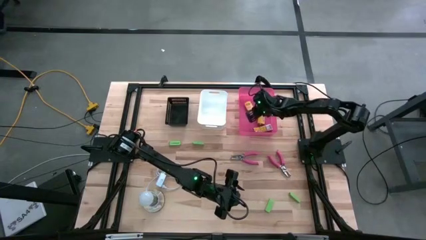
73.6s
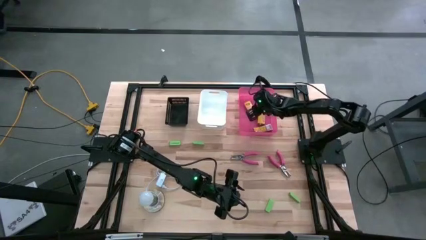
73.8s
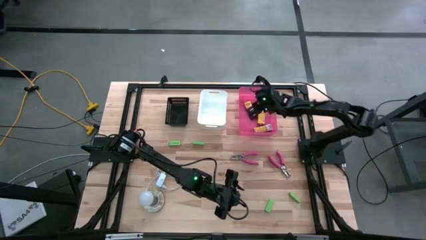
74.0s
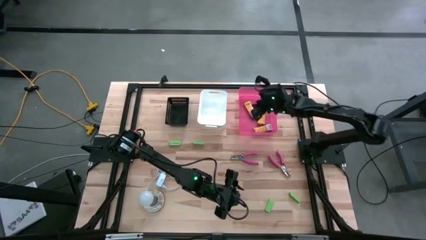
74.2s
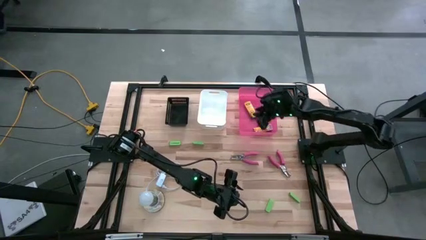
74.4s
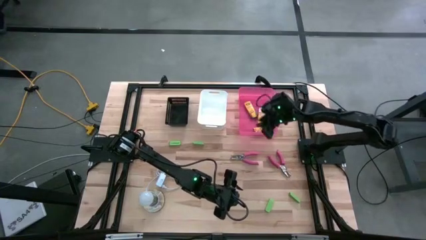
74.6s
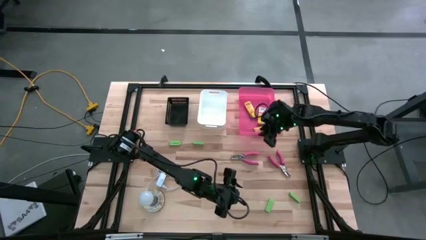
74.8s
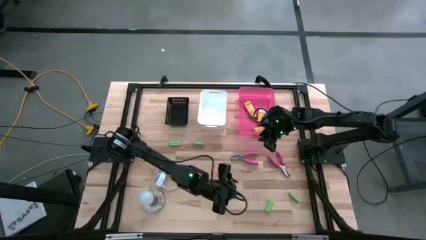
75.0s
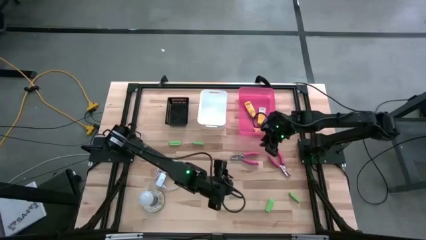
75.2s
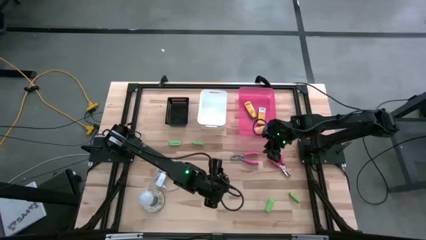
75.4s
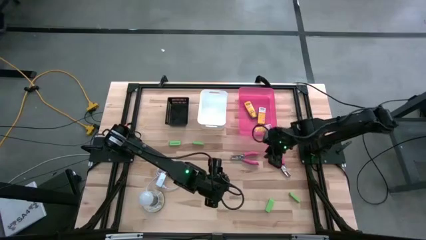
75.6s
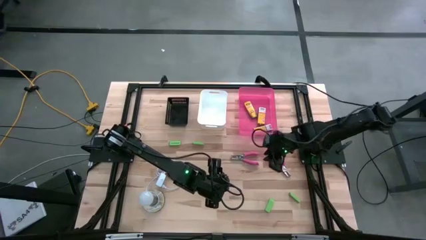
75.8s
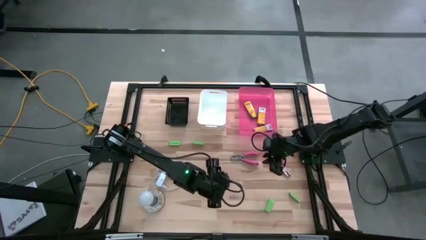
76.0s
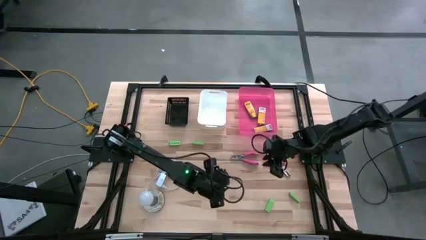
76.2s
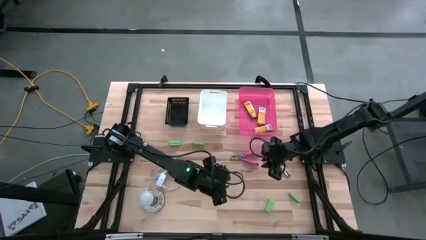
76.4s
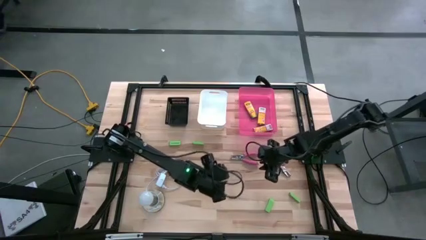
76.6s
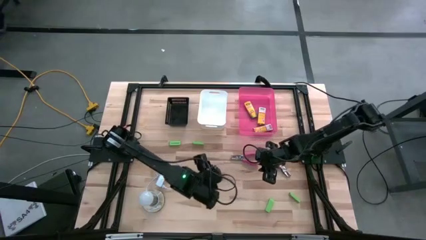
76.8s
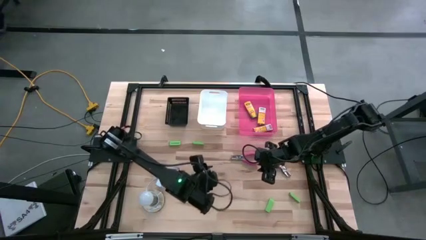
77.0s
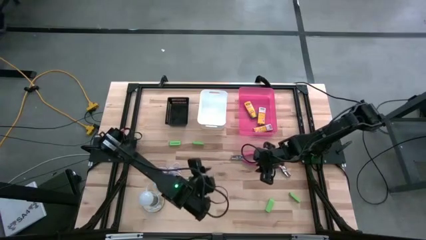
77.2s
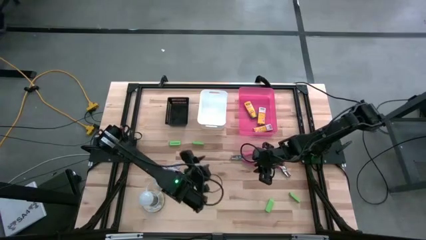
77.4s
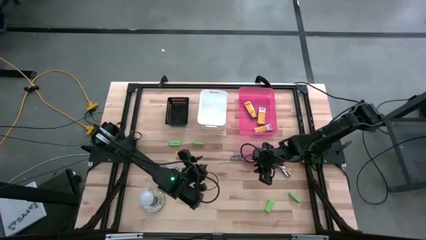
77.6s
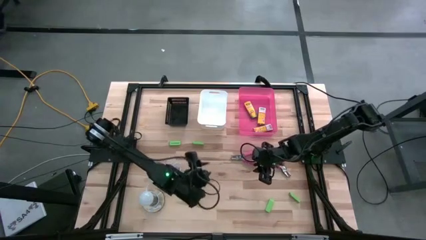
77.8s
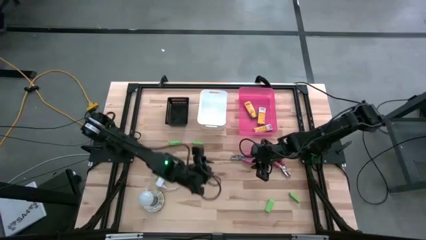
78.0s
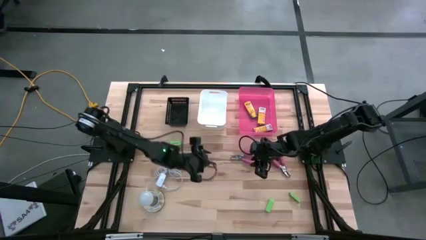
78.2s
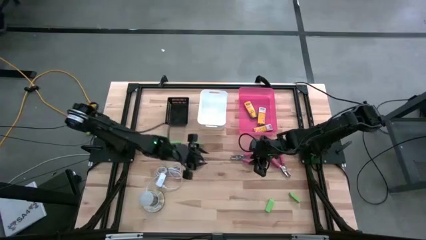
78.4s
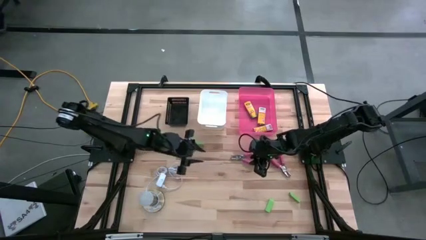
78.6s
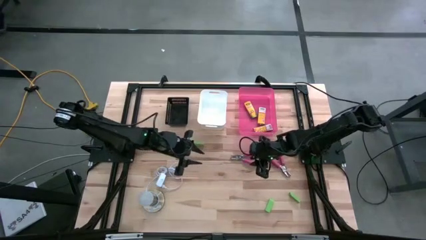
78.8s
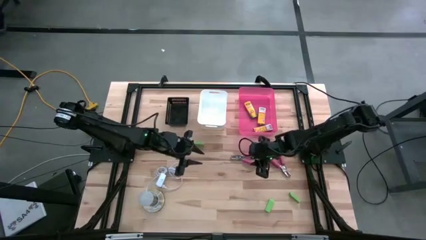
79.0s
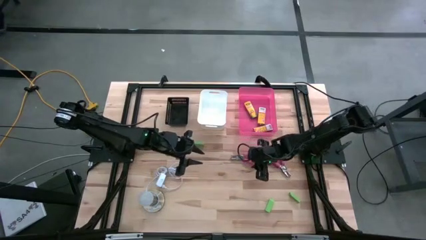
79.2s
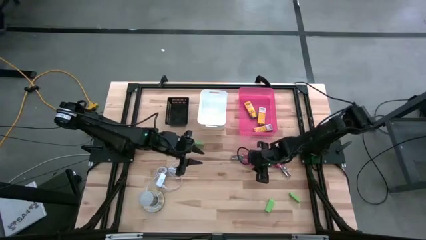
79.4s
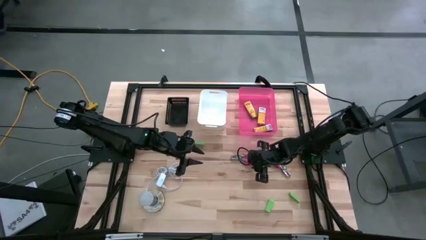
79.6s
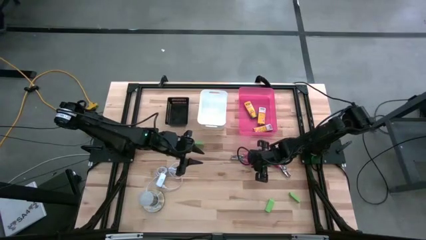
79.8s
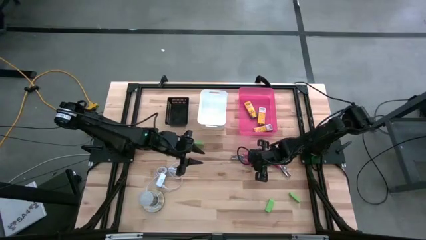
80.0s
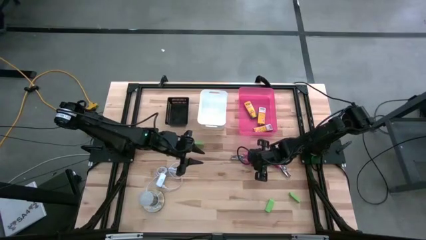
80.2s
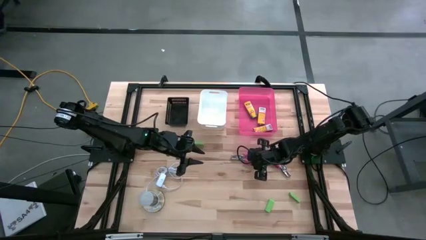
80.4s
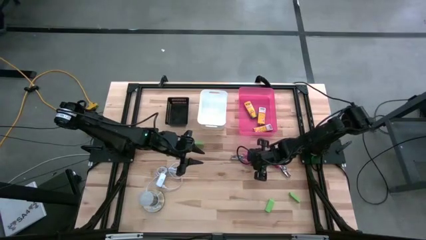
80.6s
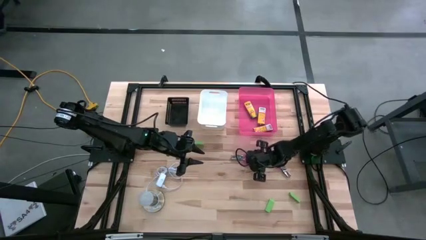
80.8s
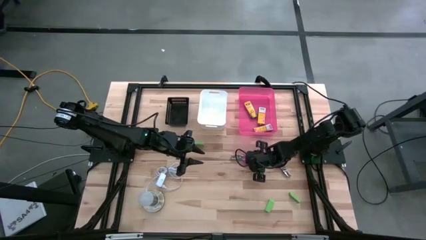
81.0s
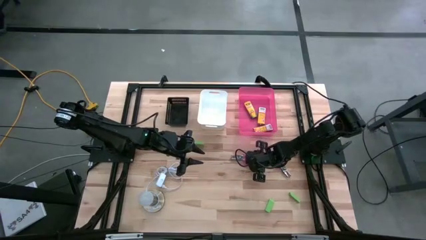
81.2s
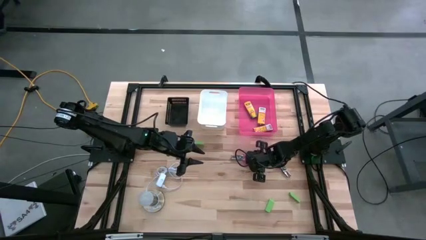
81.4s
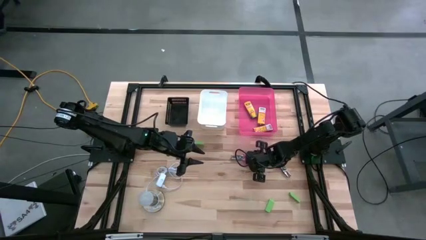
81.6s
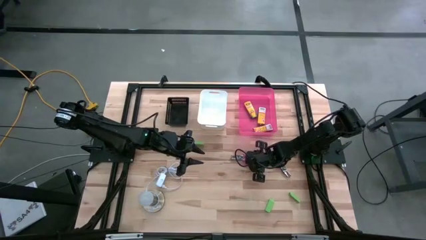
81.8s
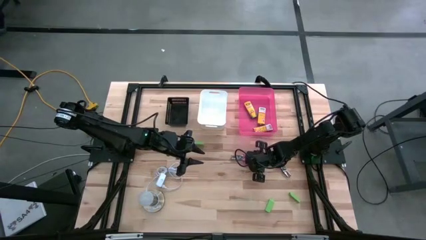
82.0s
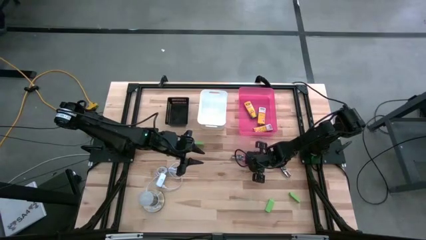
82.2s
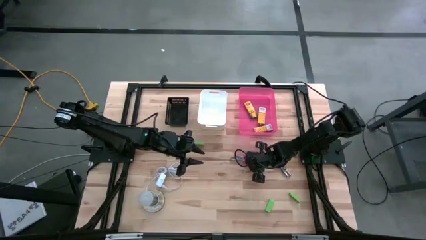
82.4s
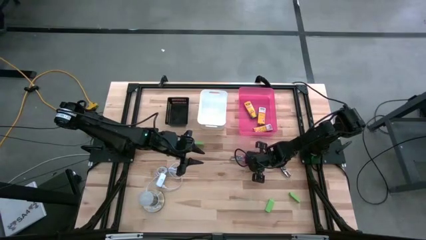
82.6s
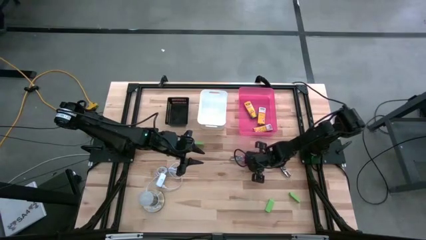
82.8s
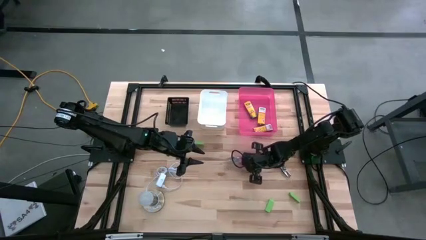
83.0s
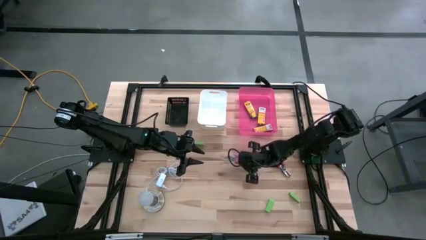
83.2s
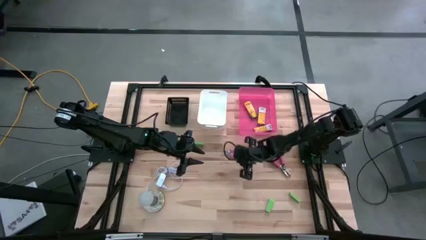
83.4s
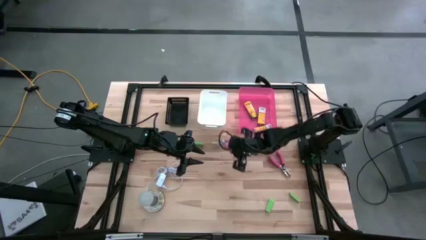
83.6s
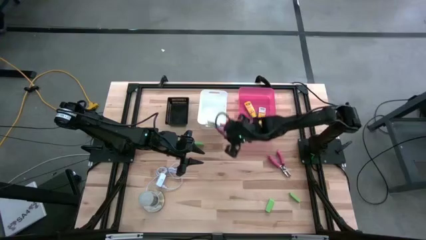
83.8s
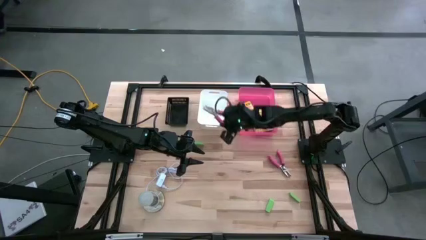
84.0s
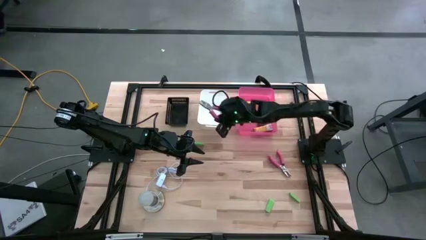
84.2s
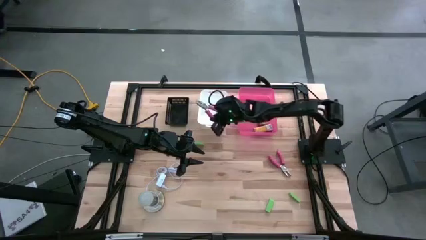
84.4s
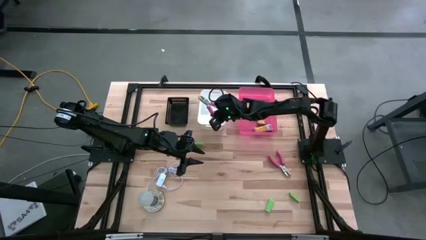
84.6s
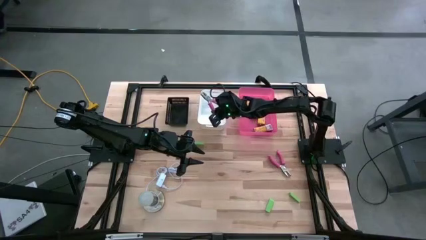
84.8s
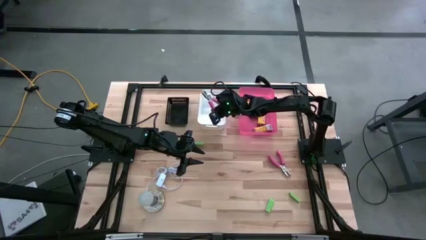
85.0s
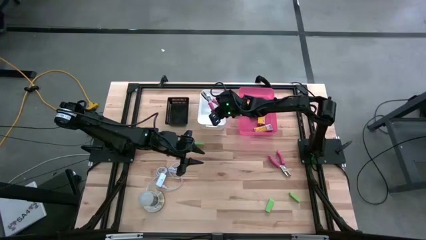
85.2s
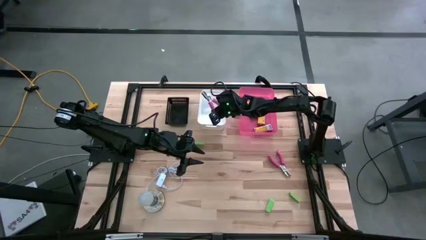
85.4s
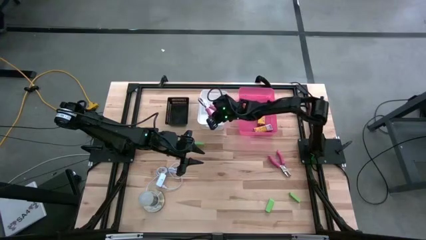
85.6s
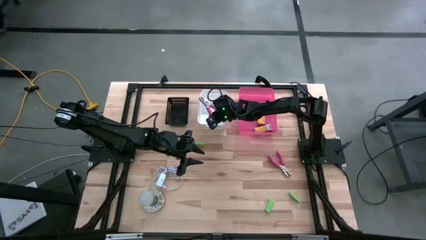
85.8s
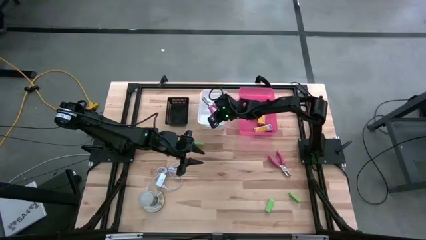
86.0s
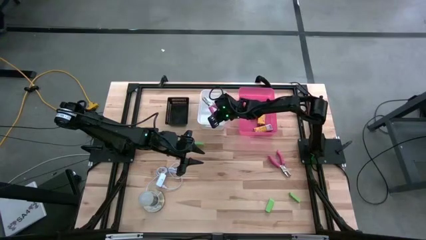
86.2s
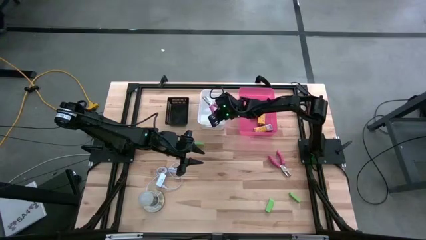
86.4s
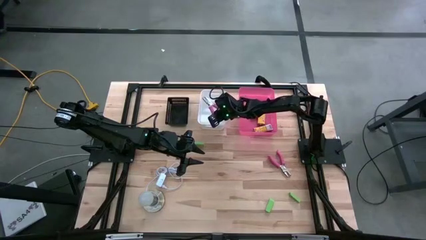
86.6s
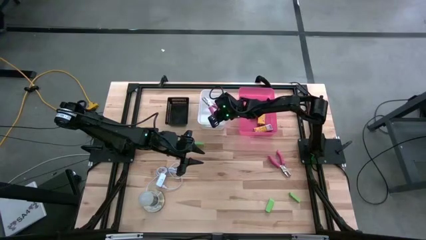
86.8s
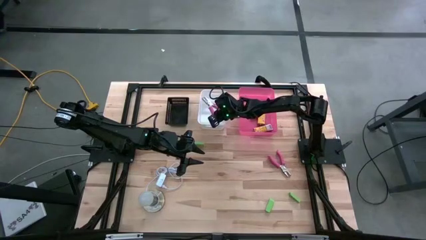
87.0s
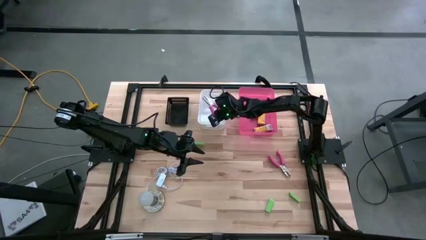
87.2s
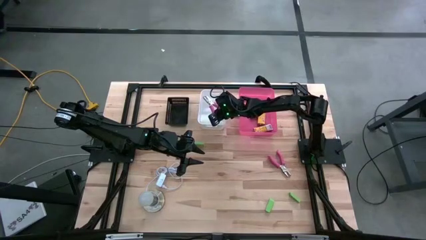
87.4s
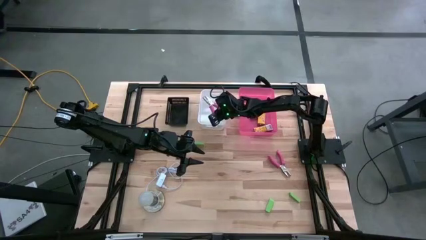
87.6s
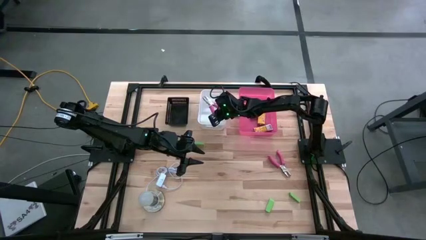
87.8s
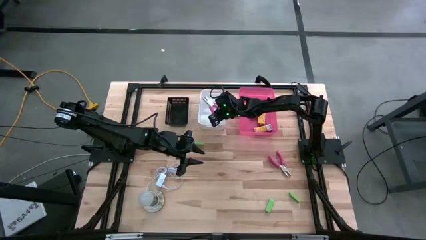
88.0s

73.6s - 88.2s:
Task: Pick & Place School Supplies
Put the left pink hole puncher into the white bin
